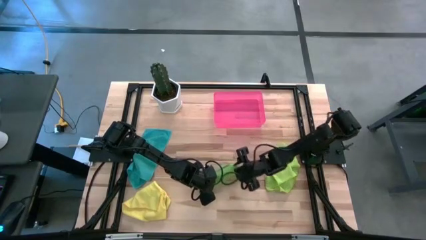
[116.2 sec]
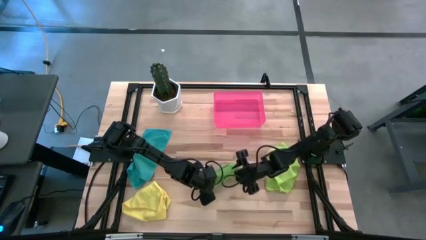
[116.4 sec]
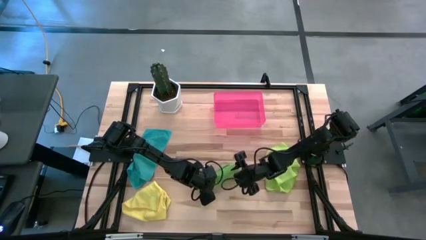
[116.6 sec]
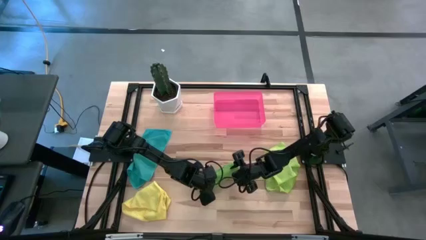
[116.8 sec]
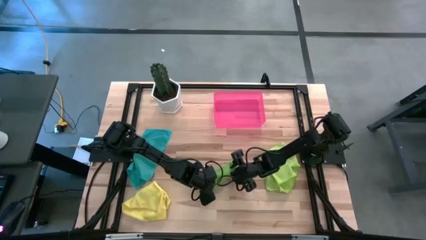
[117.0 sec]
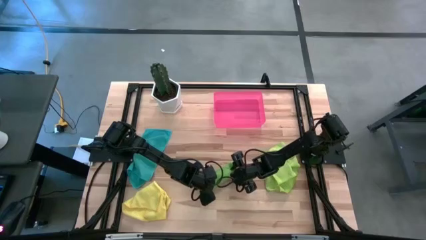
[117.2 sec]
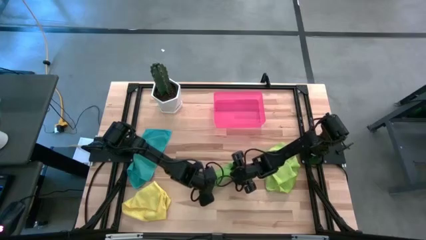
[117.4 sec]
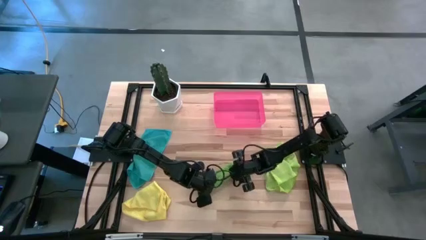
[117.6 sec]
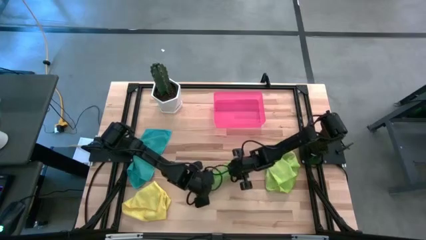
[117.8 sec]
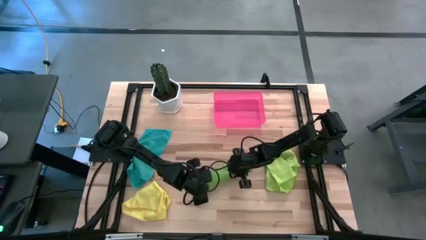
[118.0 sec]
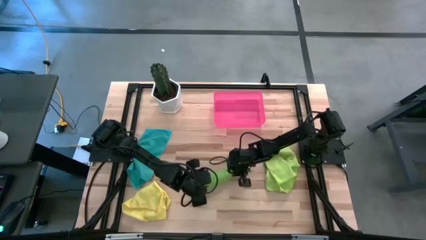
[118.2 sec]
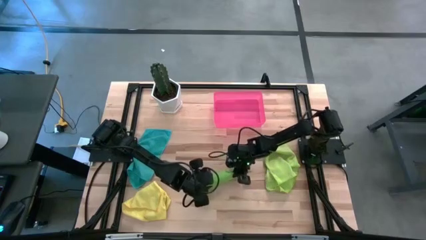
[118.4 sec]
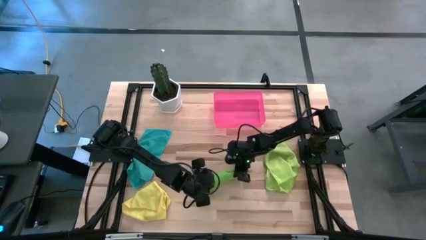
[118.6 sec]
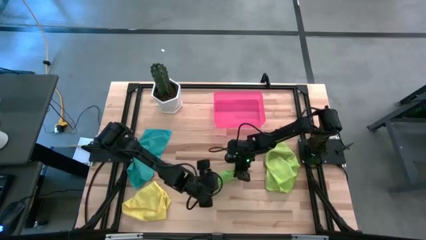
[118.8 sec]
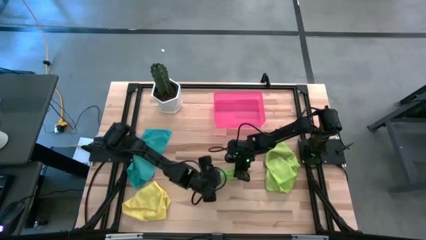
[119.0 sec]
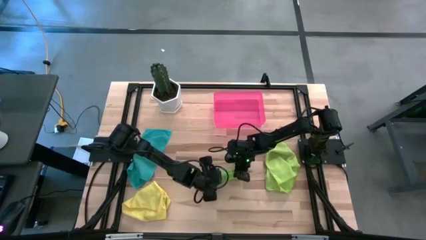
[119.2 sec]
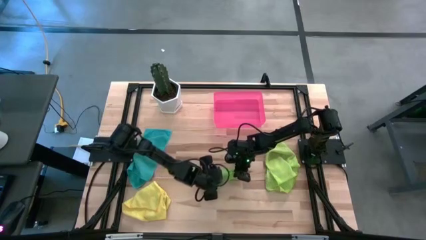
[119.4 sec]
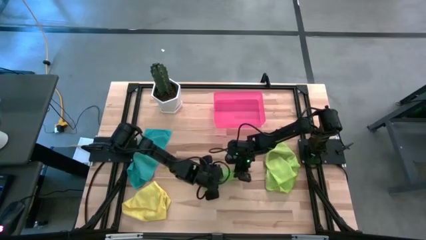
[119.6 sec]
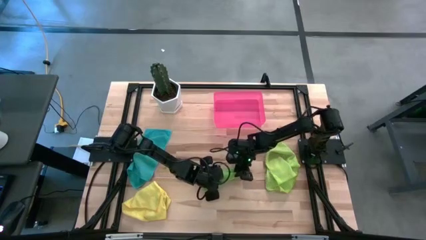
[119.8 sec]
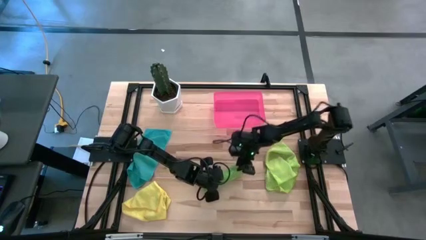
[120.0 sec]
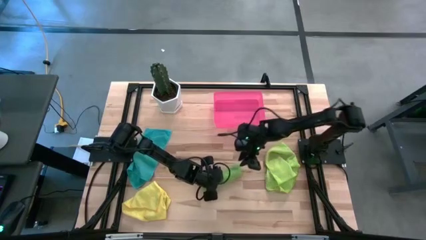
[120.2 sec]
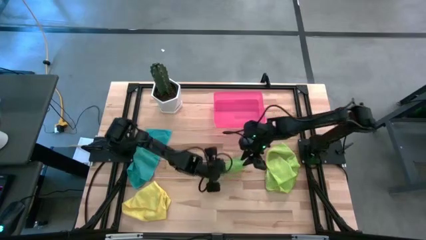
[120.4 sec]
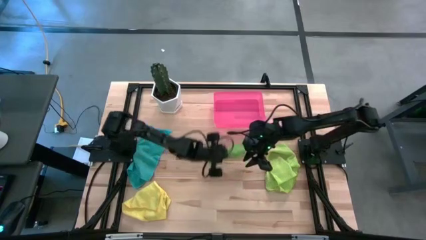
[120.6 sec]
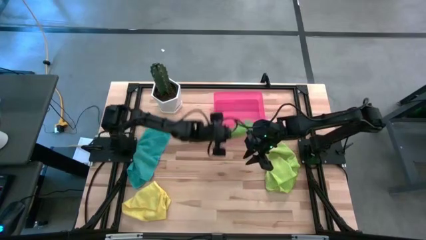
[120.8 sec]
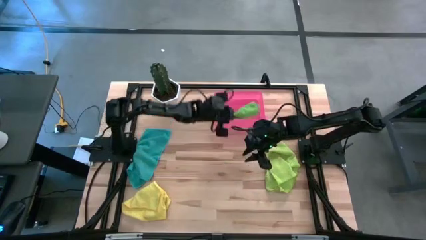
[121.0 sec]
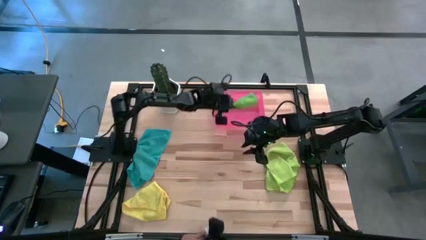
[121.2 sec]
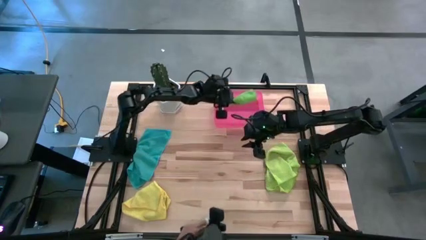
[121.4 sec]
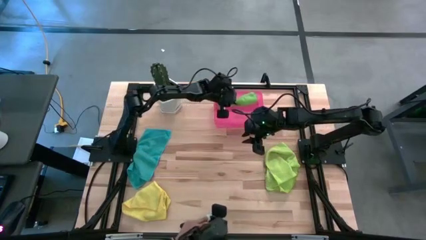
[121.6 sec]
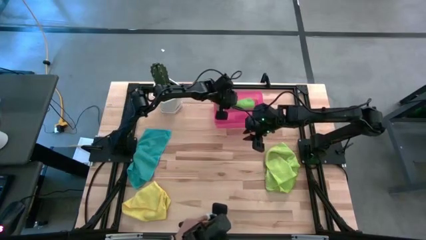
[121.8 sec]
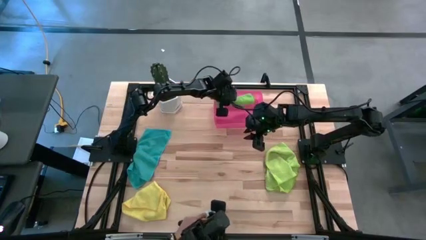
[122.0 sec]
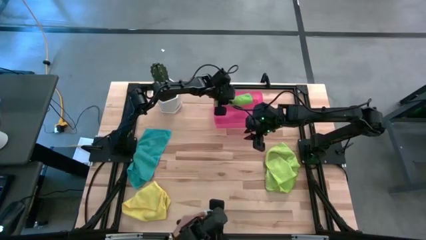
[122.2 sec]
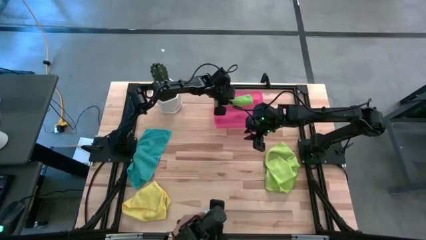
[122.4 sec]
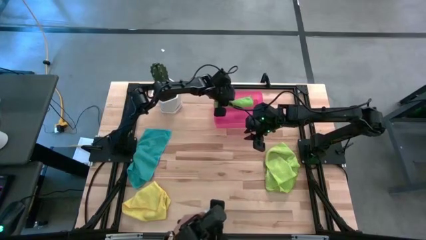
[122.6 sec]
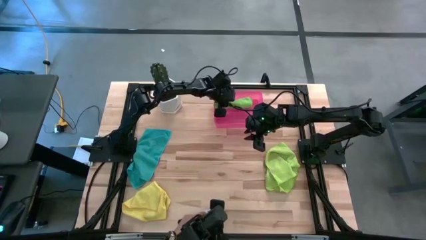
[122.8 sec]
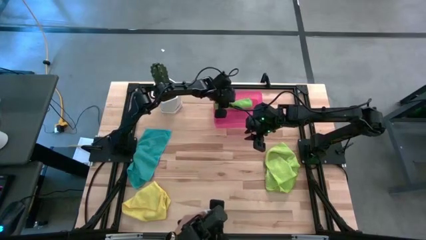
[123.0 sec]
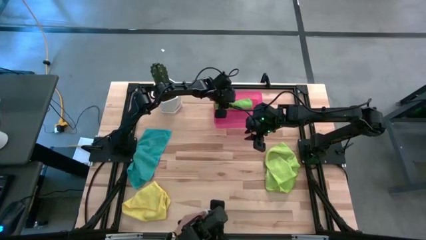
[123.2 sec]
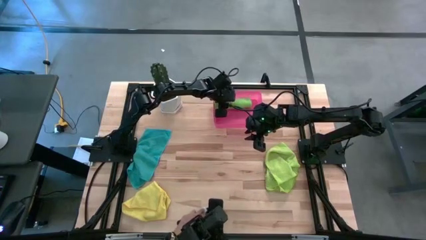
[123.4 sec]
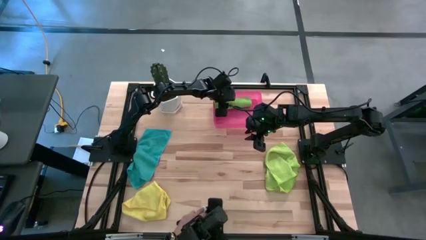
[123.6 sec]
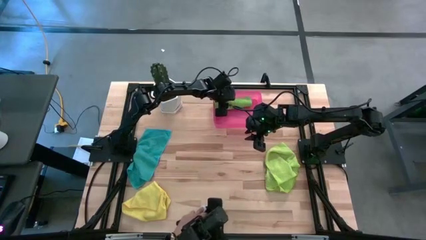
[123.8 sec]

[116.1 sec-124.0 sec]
Task: Roll microfiber towels into tight, uniform cylinder then place into a basket
Put the green microfiber cloth into the pink bin

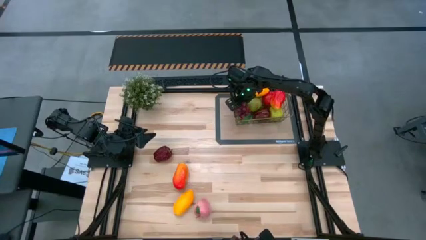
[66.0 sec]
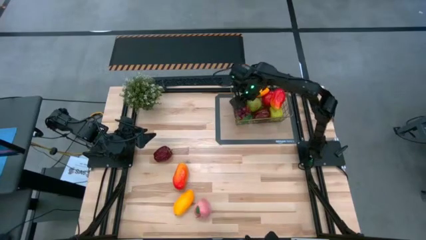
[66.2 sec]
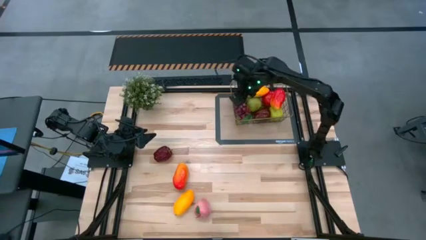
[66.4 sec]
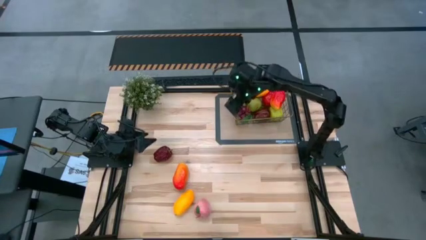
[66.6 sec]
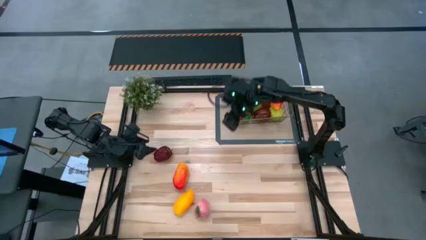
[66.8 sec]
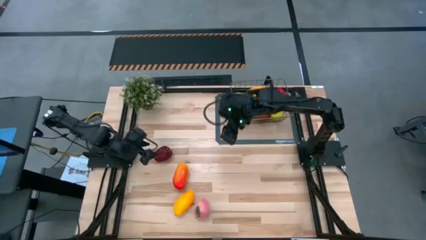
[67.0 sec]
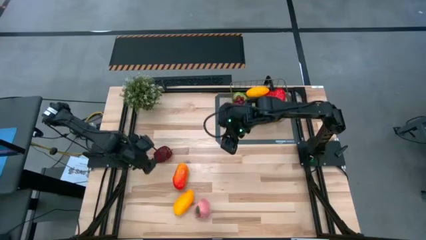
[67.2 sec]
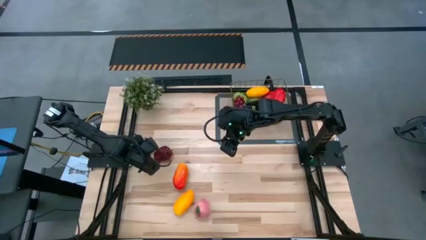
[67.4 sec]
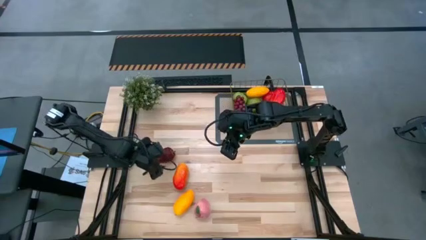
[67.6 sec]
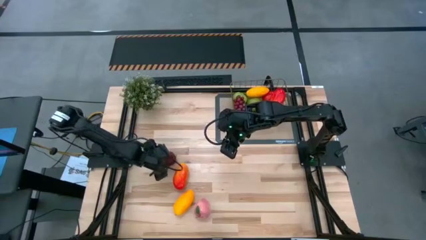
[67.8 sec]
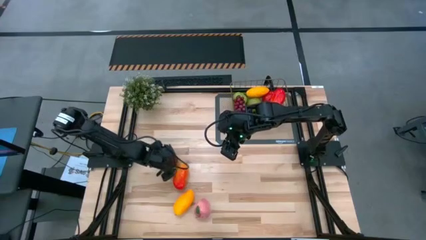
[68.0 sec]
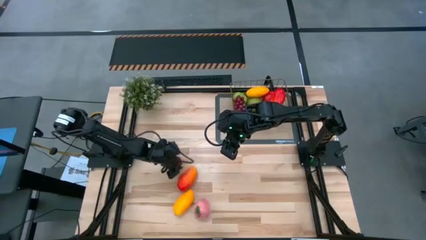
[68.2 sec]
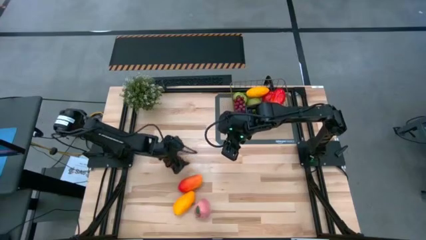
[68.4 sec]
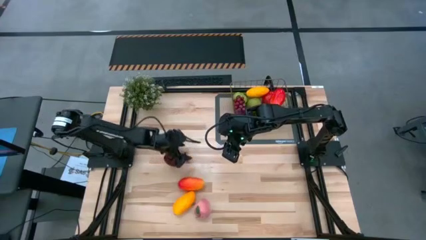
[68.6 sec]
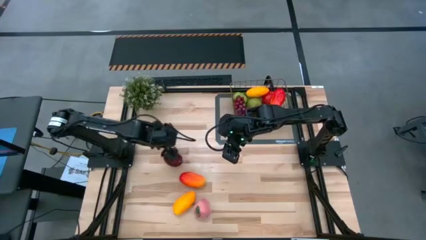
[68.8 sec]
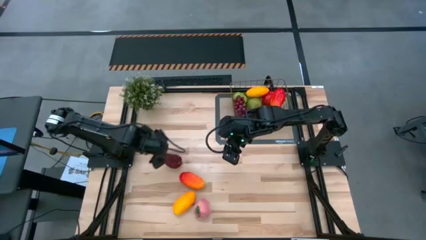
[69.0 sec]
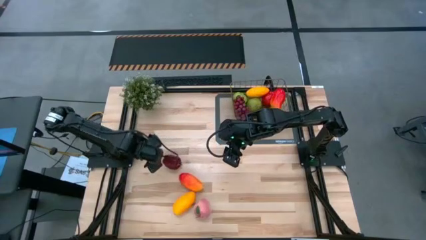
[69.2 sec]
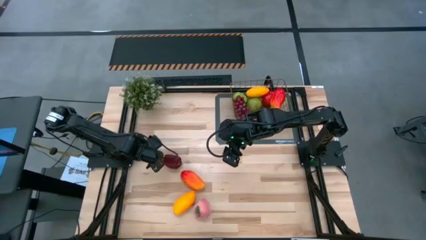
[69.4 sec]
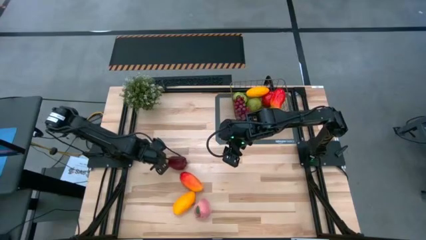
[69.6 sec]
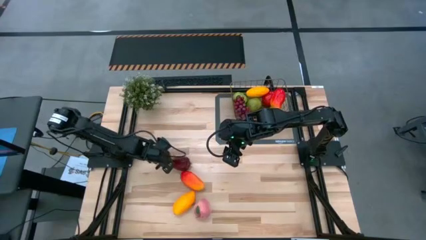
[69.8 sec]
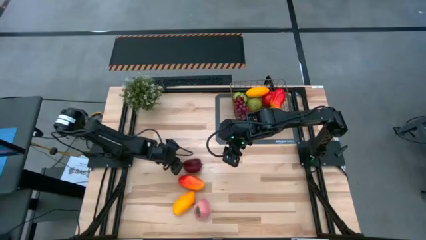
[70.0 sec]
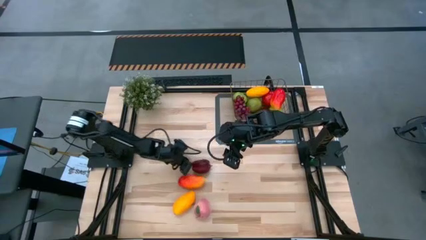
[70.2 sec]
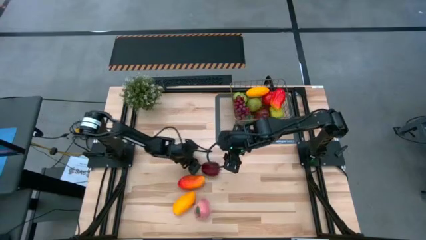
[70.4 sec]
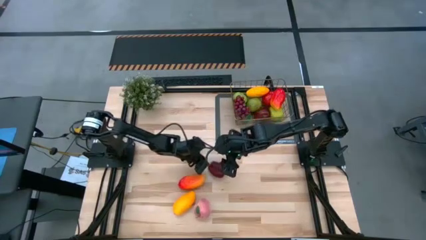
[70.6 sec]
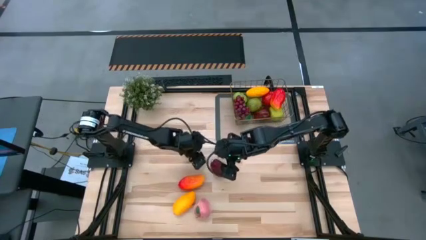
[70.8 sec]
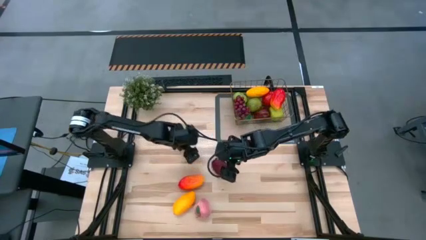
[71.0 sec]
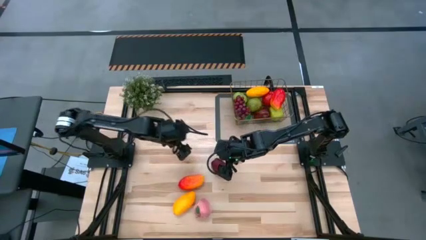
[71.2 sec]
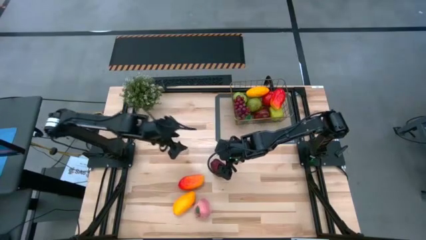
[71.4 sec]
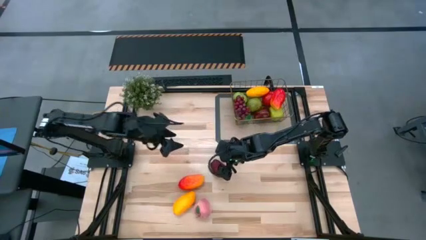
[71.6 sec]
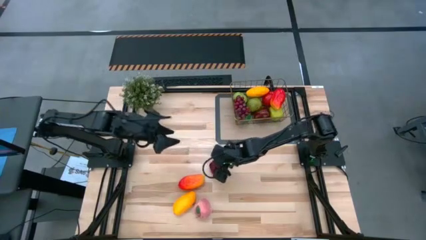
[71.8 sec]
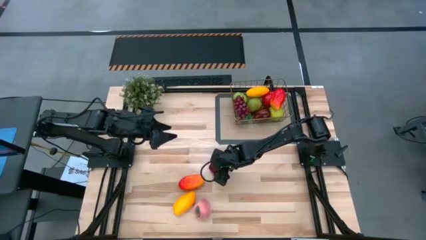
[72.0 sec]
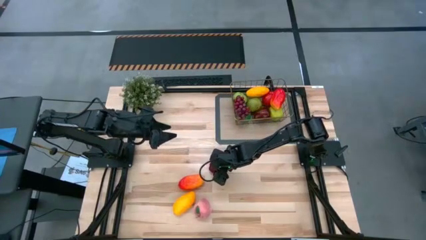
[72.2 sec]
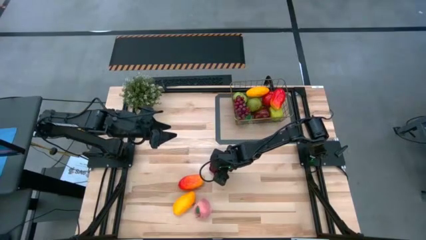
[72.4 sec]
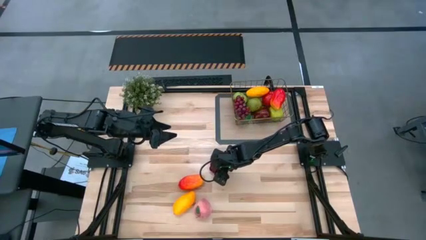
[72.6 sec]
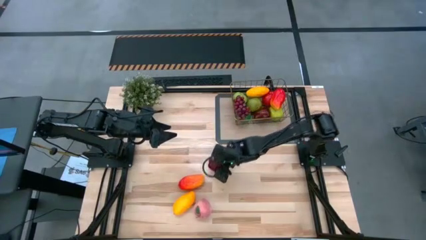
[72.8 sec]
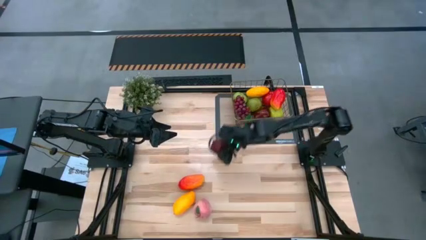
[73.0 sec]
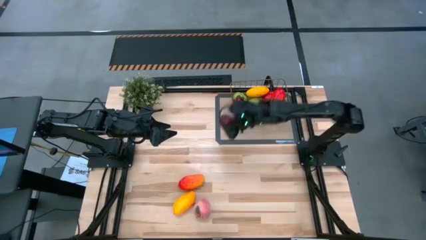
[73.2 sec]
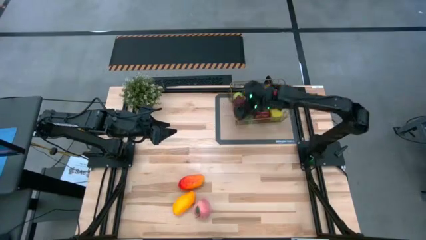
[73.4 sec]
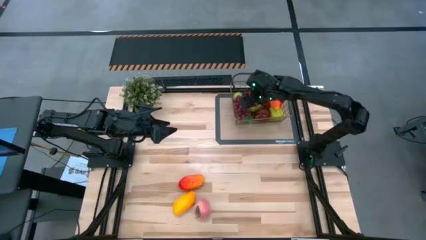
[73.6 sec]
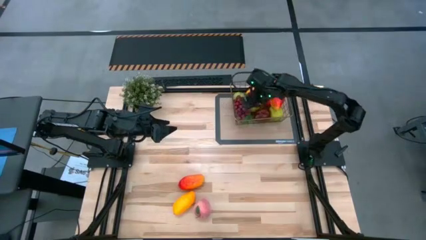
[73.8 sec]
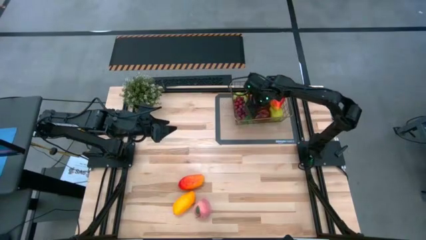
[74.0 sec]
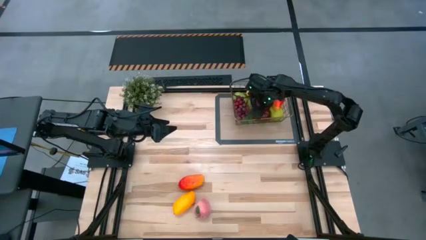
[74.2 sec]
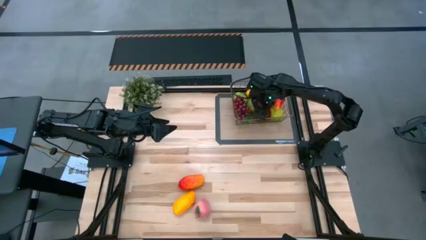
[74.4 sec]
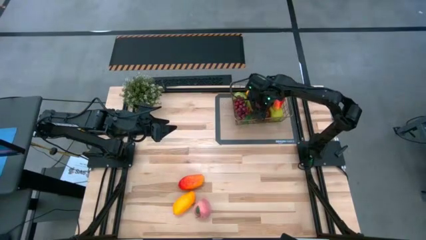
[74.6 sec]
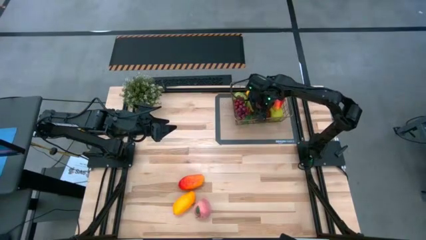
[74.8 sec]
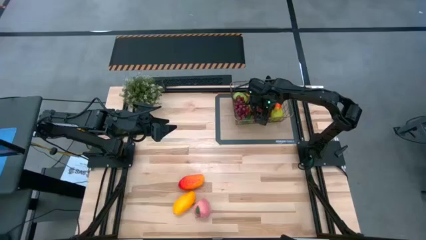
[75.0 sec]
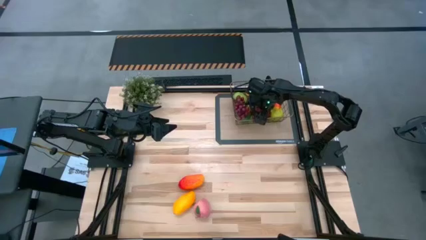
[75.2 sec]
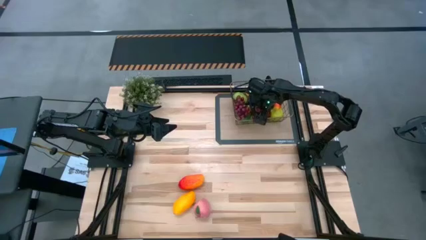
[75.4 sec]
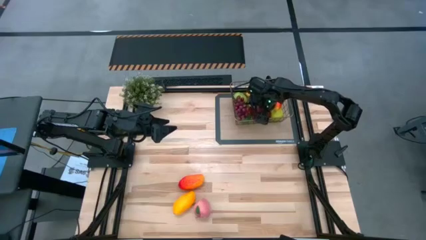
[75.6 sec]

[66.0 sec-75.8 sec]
Task: Build produce basket
Put the dark red apple into the gold wire basket
